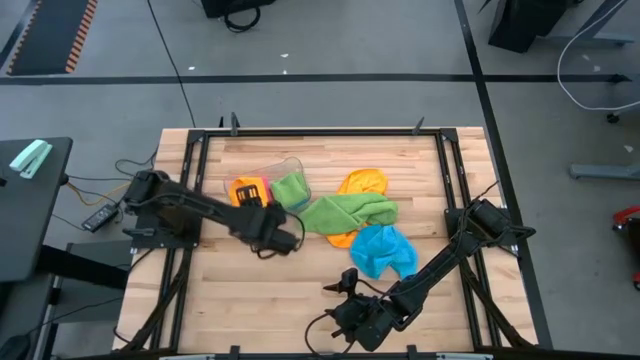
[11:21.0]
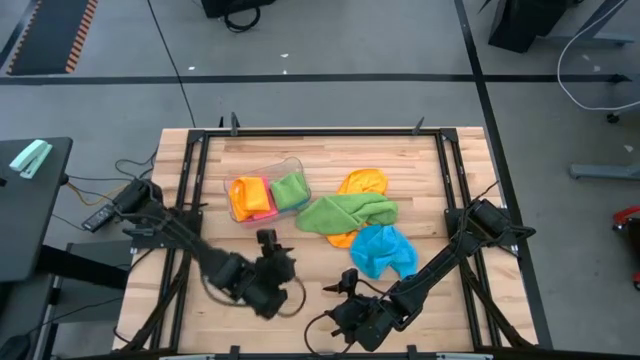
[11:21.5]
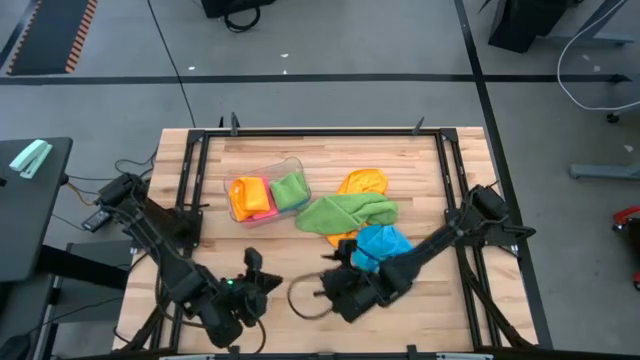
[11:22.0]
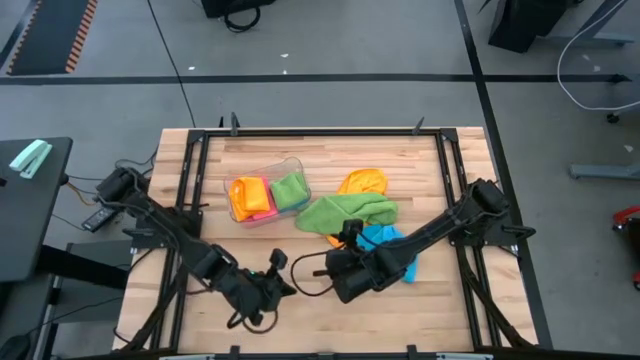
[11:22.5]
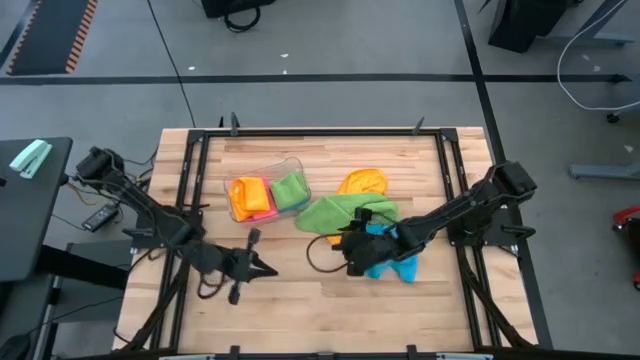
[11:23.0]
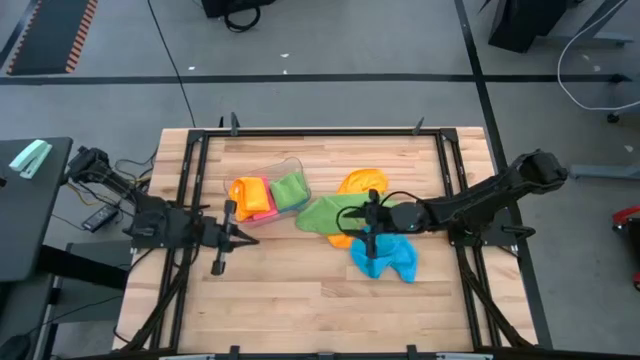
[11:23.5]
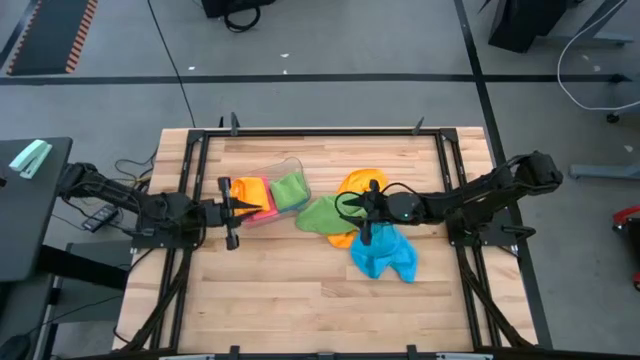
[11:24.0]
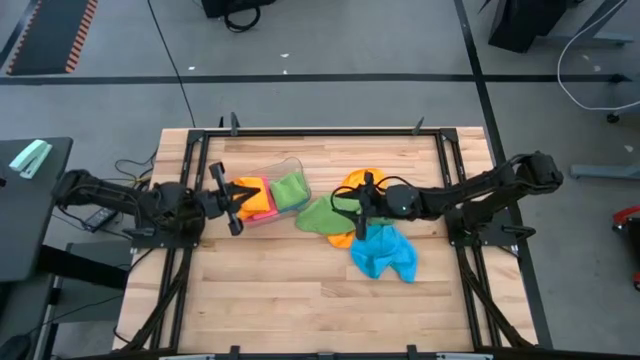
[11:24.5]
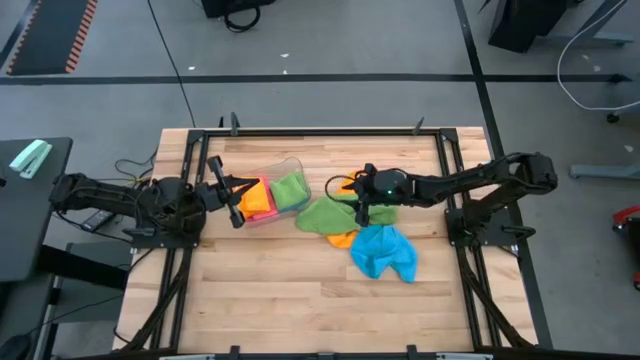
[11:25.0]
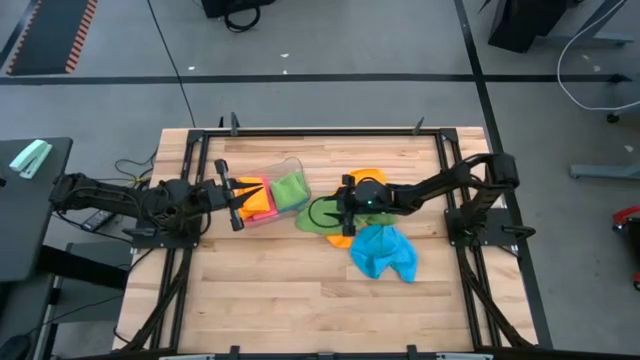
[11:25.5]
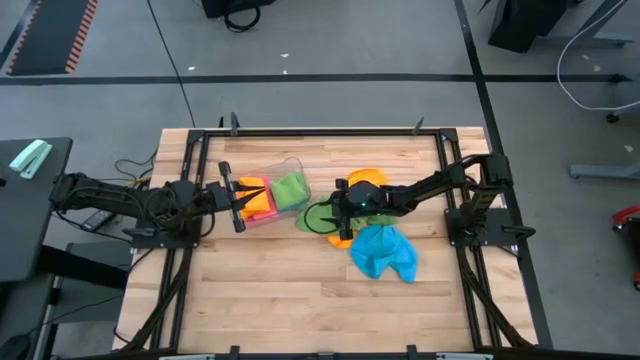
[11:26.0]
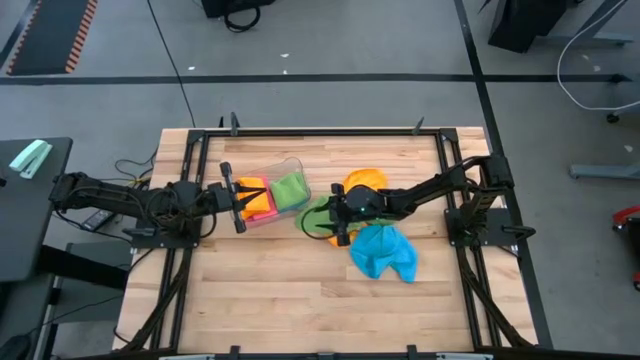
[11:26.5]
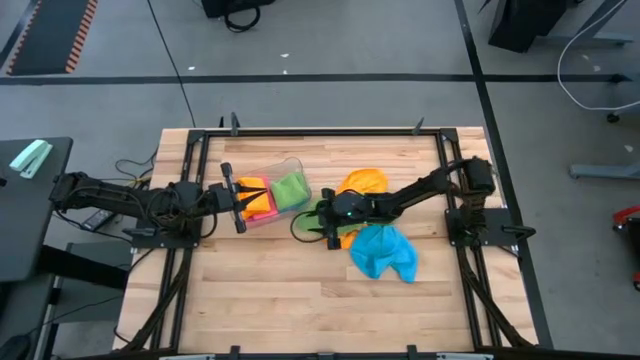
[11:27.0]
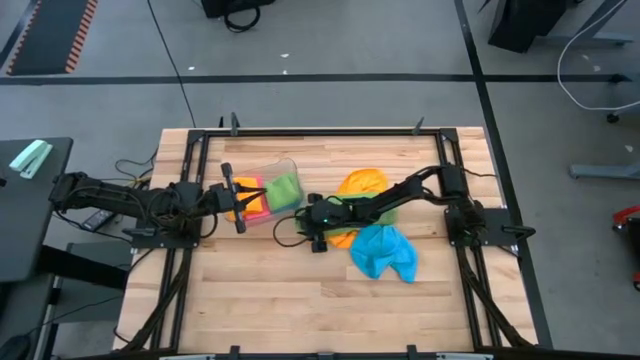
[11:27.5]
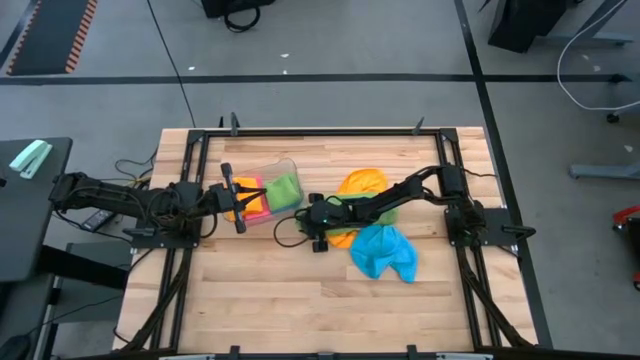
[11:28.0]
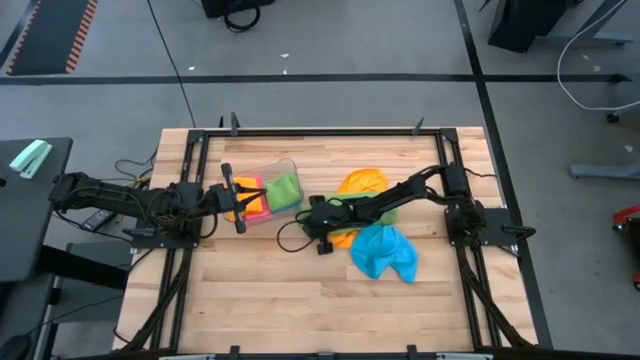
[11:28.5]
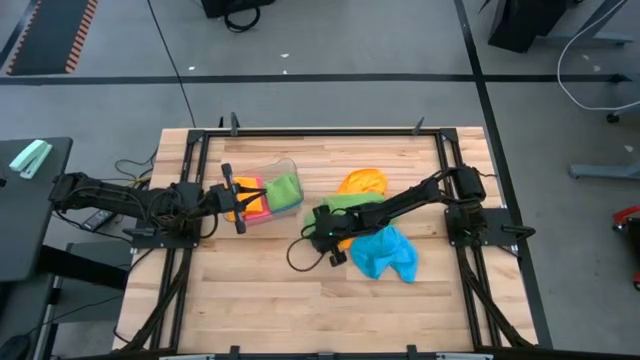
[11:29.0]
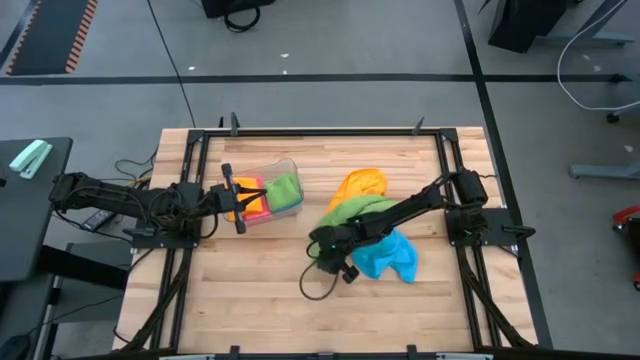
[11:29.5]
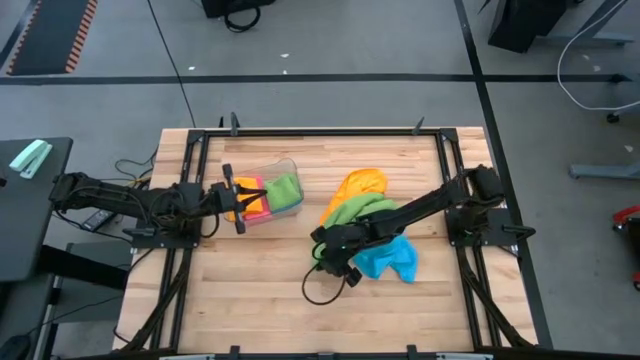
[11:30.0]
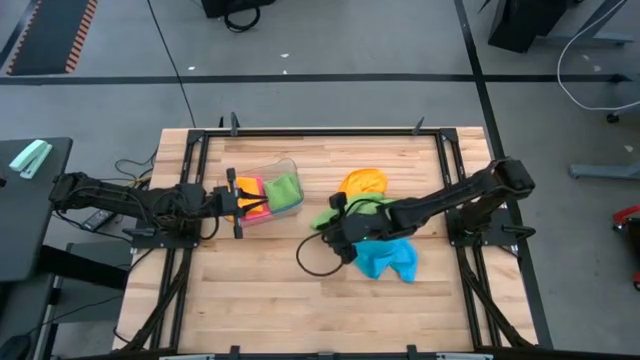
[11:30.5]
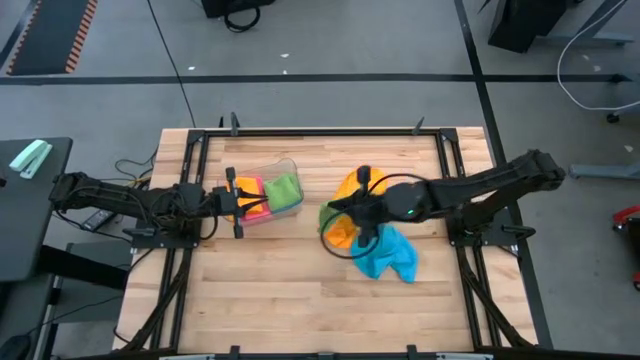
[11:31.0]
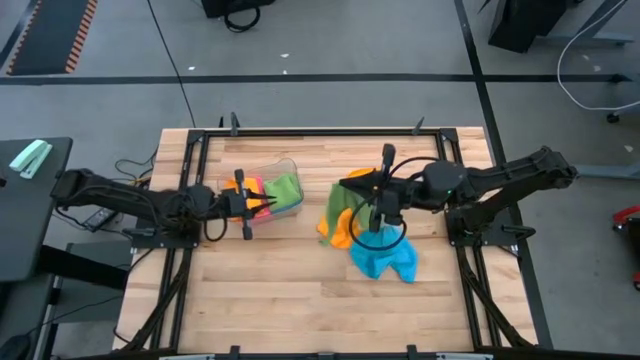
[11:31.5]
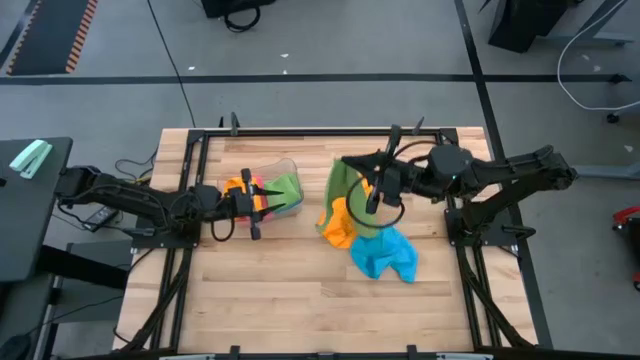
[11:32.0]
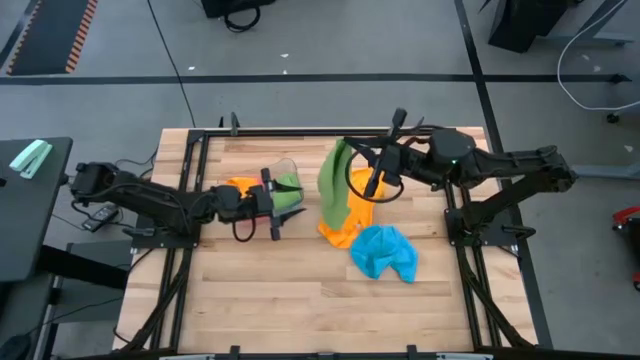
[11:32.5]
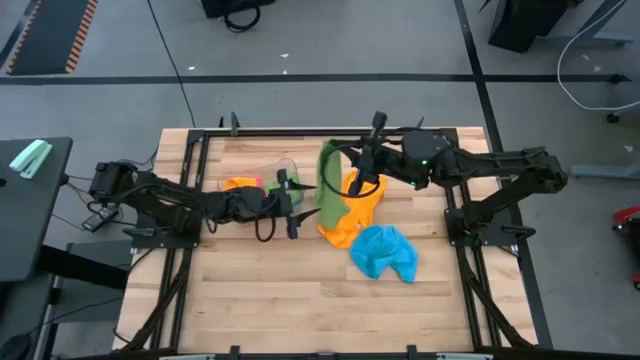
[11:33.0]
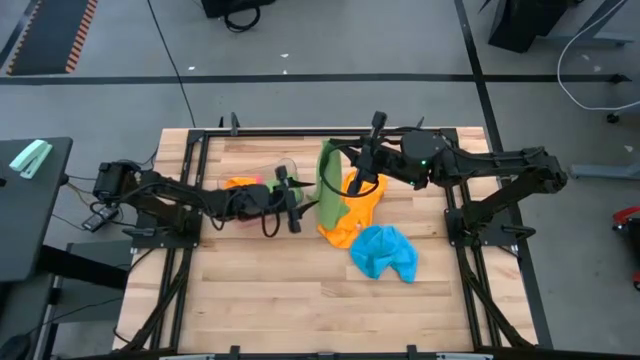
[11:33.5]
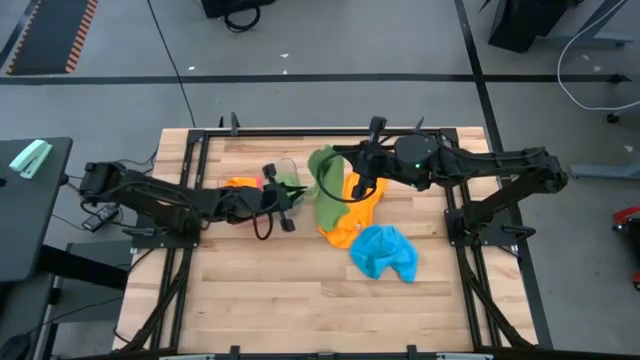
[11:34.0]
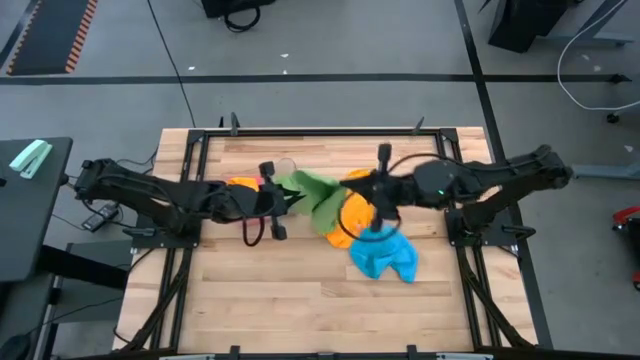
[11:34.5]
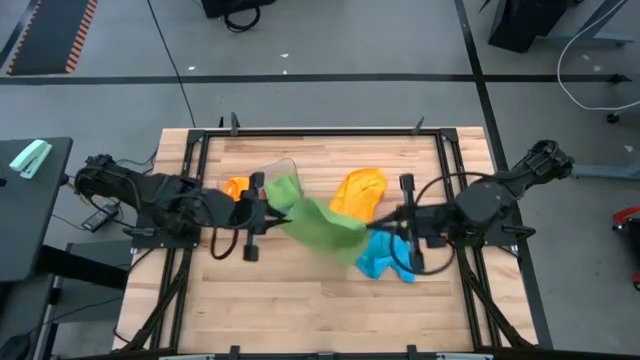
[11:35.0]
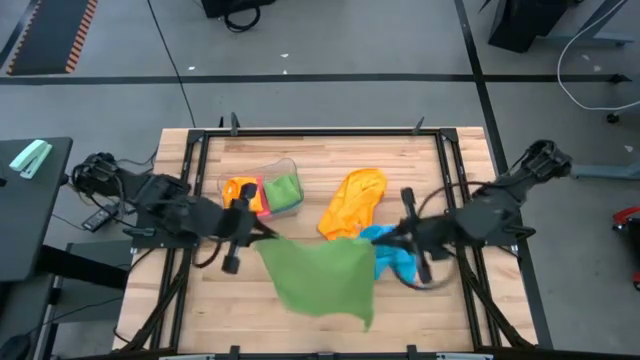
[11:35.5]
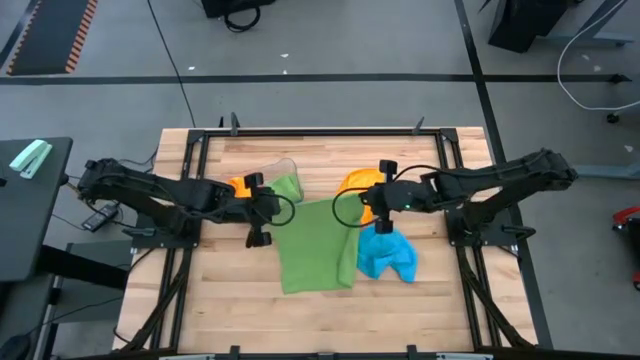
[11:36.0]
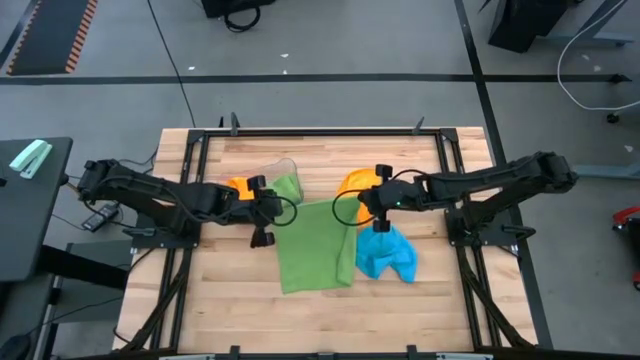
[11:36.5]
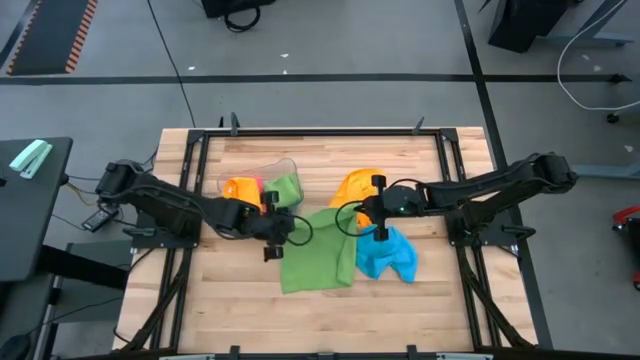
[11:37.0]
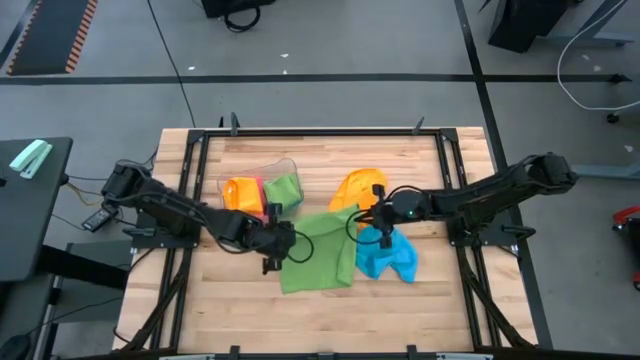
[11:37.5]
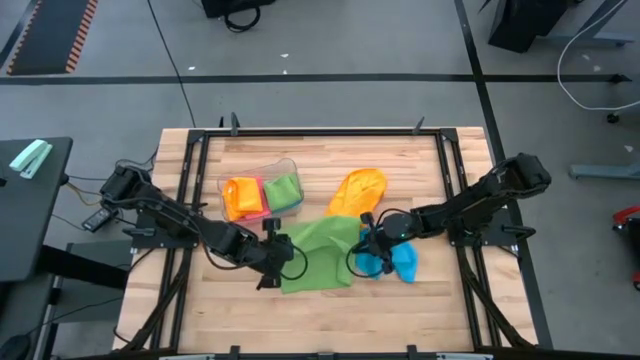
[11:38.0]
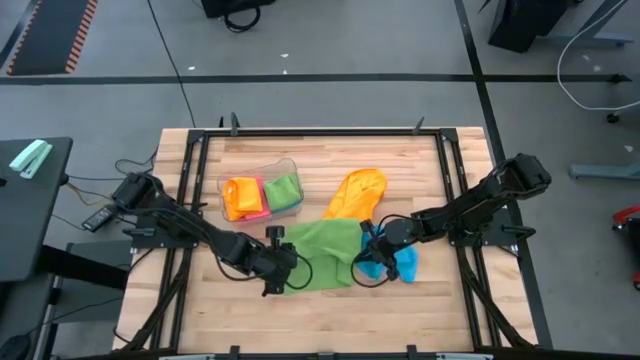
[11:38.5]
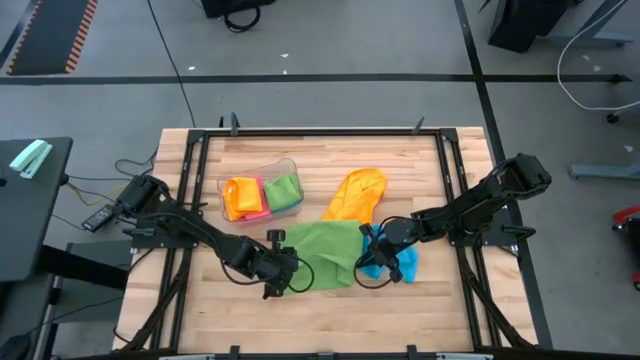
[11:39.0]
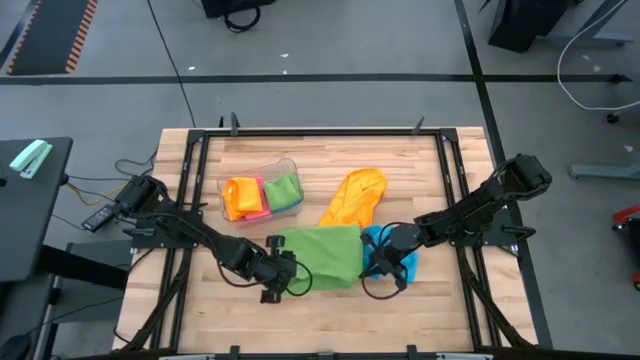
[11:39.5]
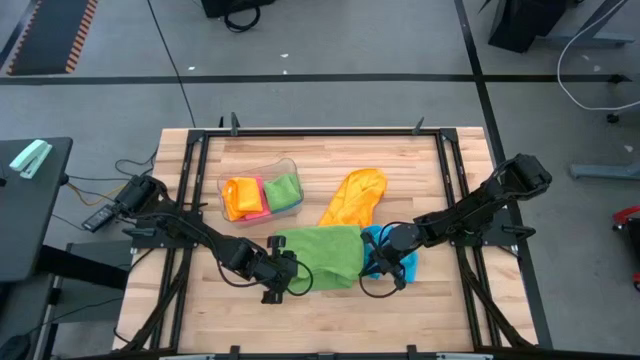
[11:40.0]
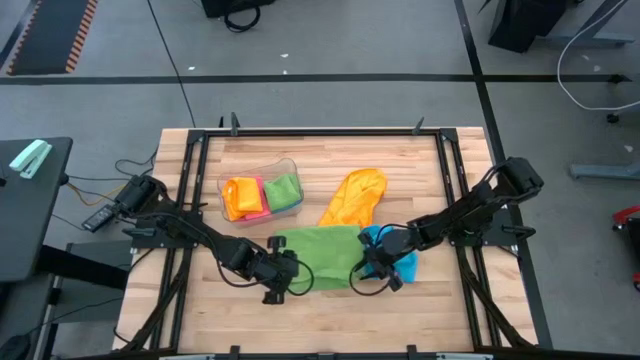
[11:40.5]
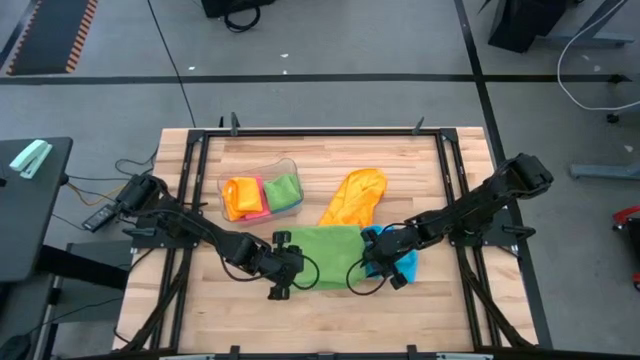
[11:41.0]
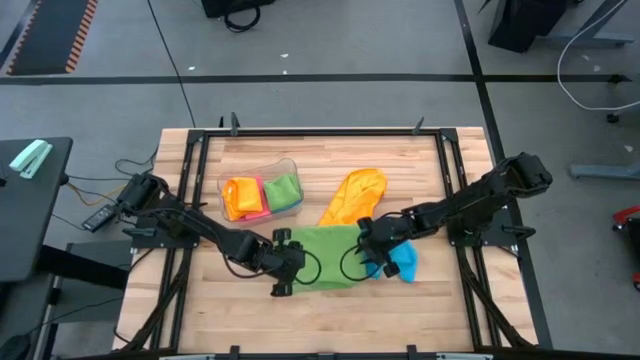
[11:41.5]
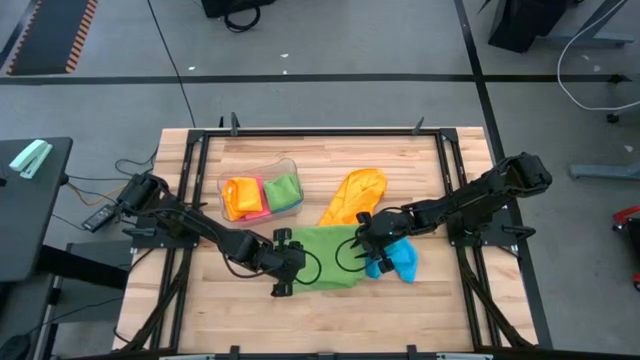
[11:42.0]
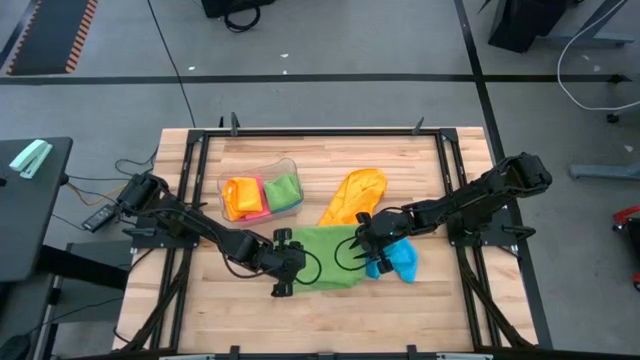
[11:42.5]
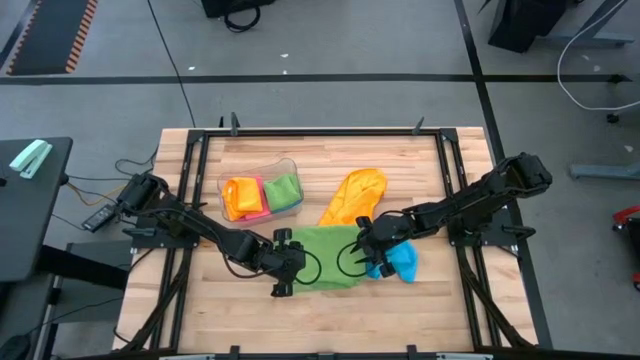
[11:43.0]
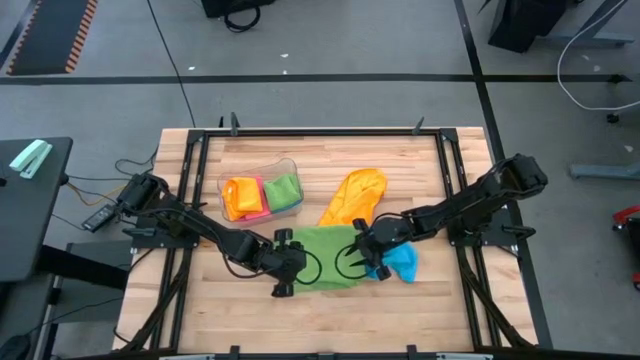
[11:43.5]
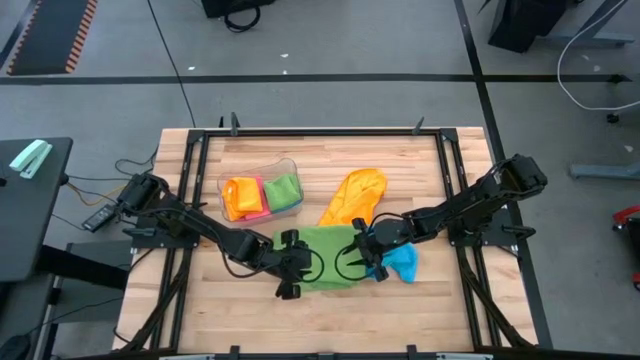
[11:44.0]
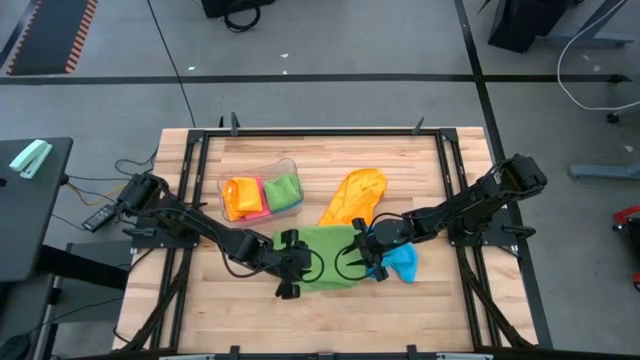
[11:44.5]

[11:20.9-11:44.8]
Task: Fold microfiber towels
Fold the green microfiber towel
